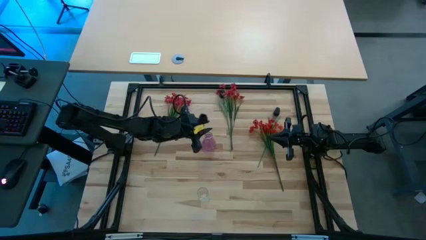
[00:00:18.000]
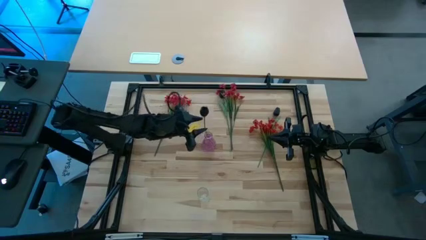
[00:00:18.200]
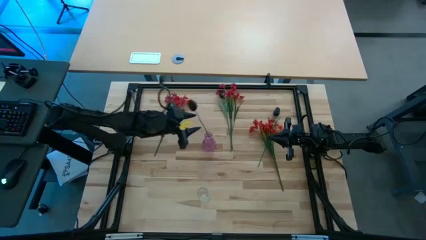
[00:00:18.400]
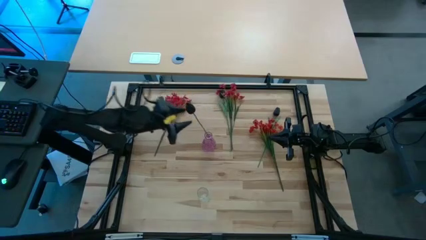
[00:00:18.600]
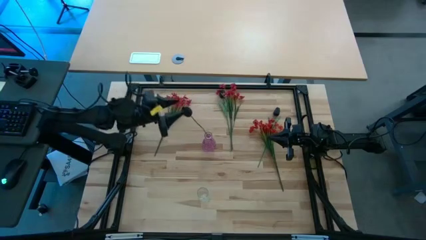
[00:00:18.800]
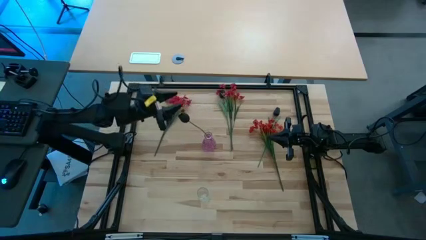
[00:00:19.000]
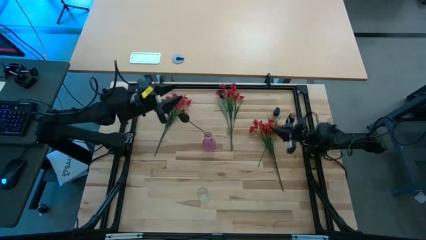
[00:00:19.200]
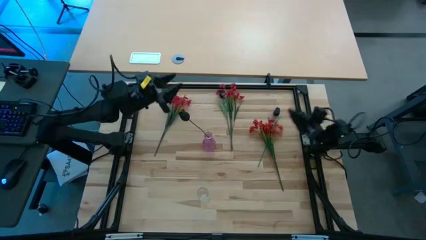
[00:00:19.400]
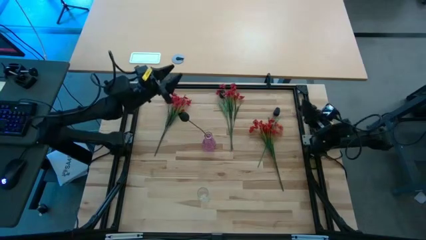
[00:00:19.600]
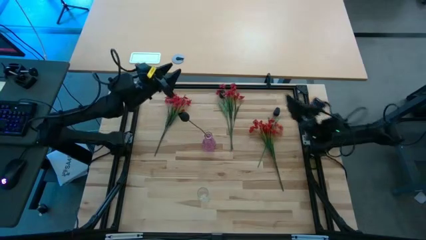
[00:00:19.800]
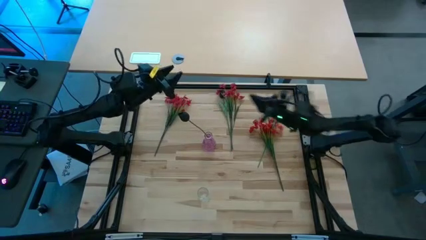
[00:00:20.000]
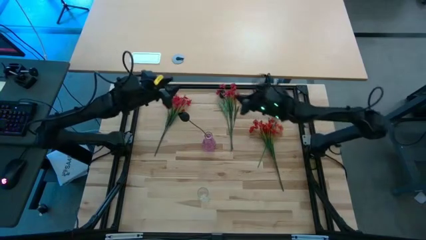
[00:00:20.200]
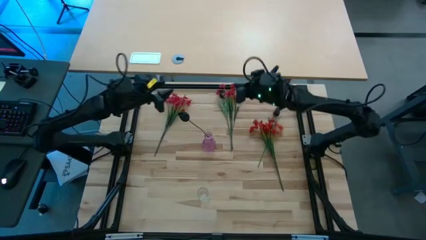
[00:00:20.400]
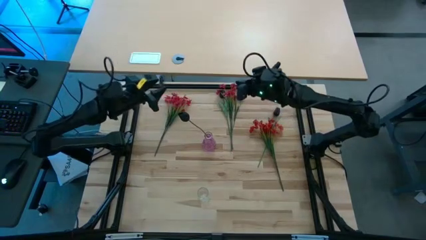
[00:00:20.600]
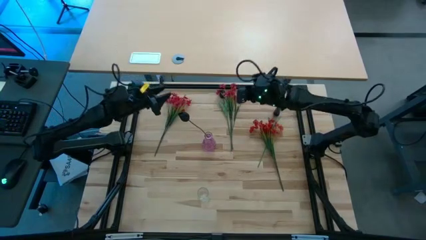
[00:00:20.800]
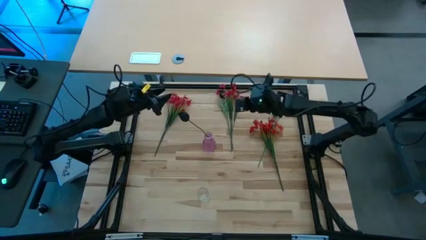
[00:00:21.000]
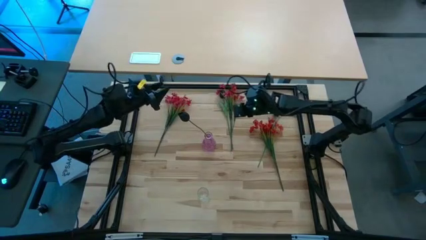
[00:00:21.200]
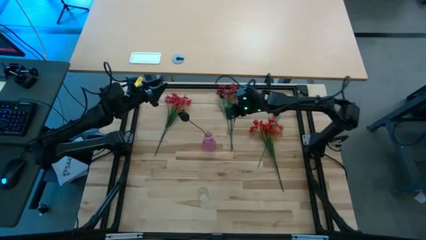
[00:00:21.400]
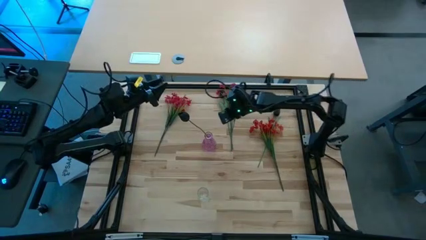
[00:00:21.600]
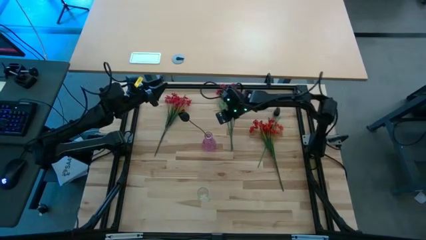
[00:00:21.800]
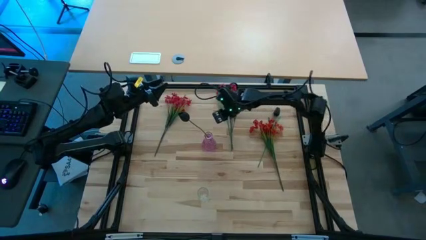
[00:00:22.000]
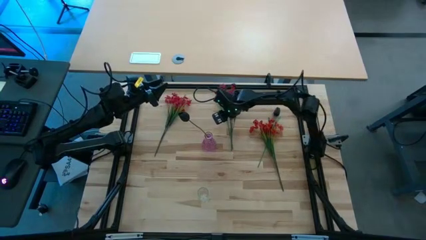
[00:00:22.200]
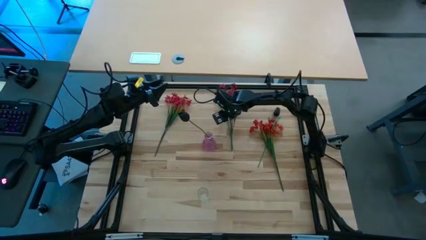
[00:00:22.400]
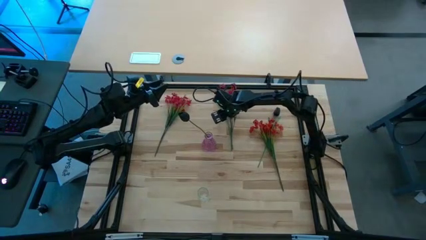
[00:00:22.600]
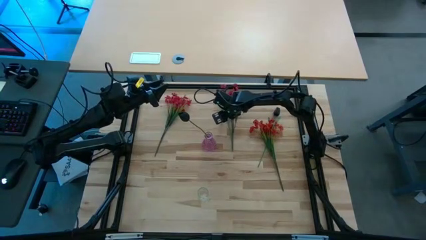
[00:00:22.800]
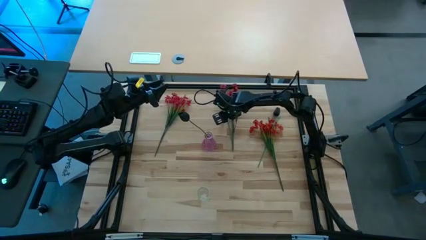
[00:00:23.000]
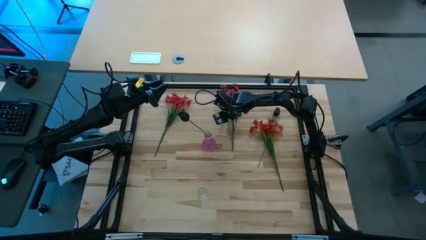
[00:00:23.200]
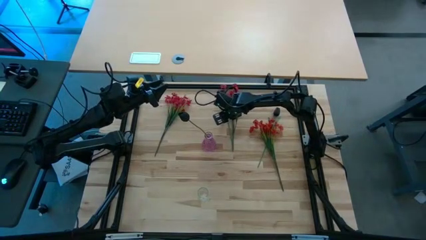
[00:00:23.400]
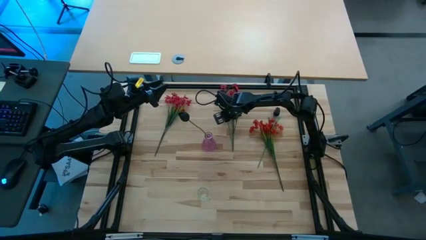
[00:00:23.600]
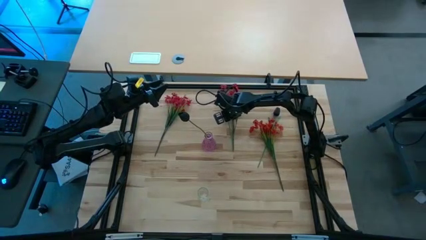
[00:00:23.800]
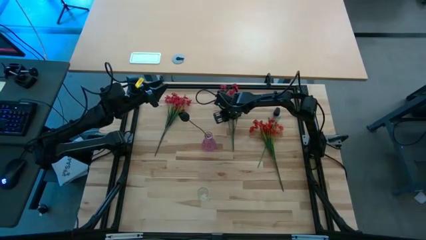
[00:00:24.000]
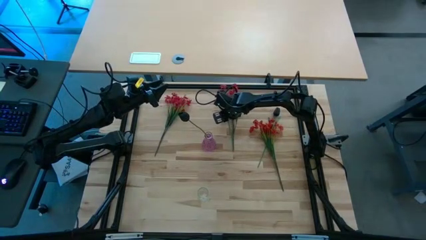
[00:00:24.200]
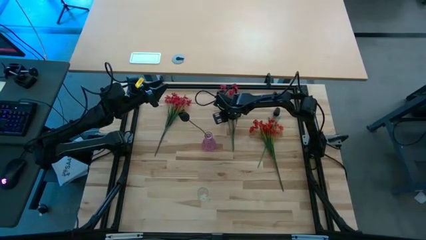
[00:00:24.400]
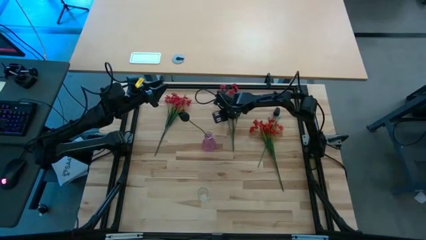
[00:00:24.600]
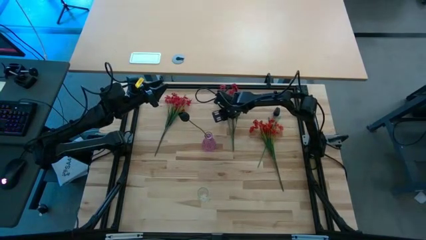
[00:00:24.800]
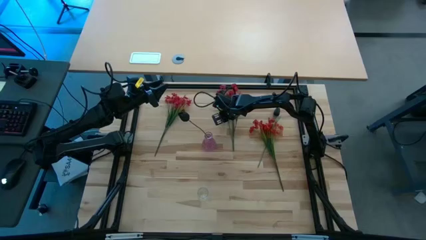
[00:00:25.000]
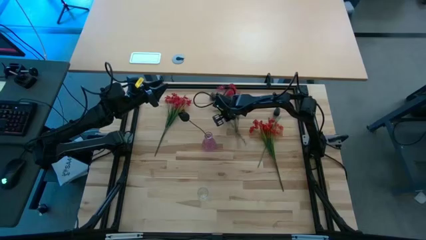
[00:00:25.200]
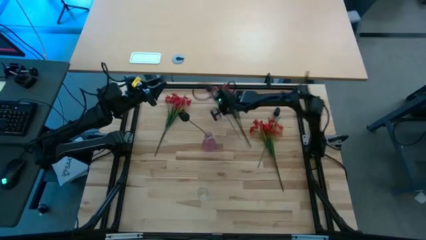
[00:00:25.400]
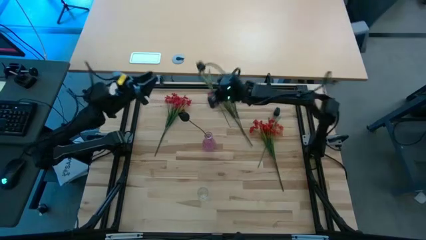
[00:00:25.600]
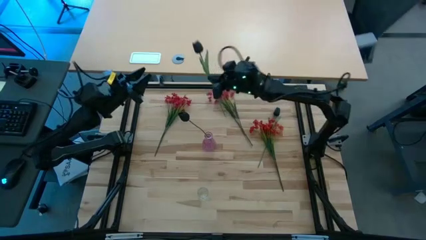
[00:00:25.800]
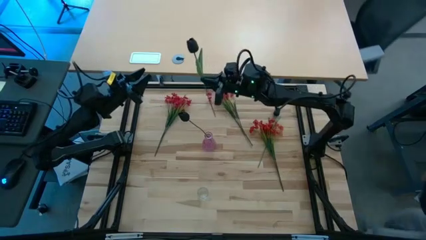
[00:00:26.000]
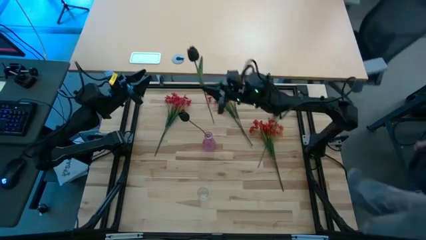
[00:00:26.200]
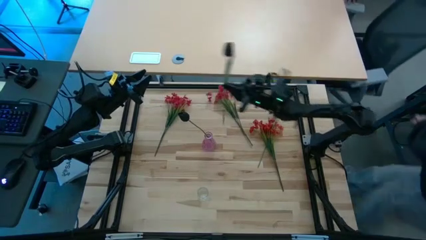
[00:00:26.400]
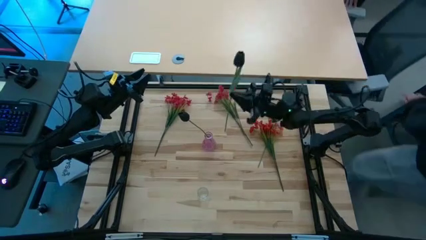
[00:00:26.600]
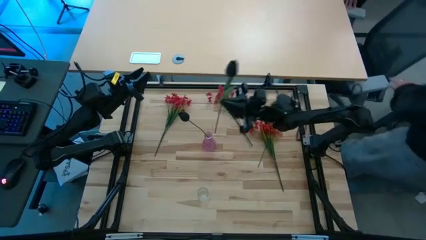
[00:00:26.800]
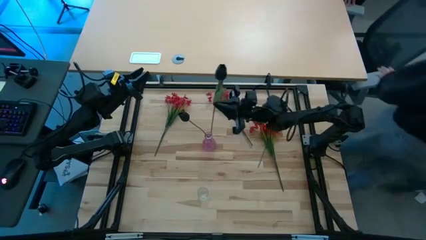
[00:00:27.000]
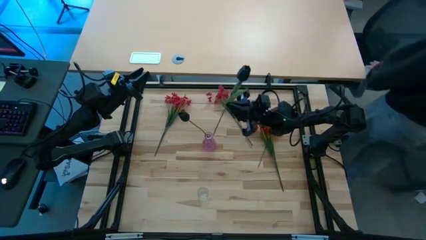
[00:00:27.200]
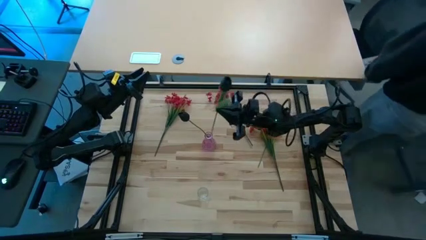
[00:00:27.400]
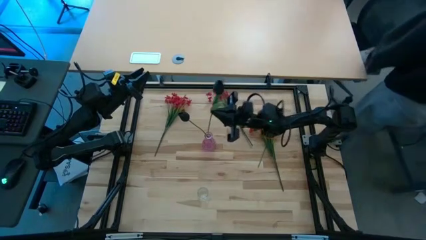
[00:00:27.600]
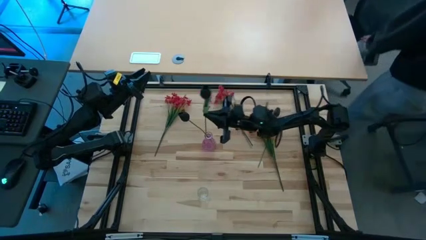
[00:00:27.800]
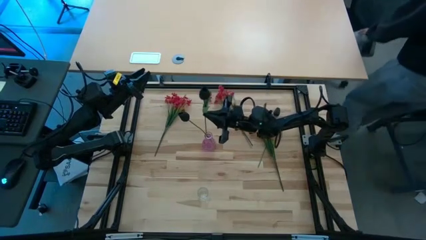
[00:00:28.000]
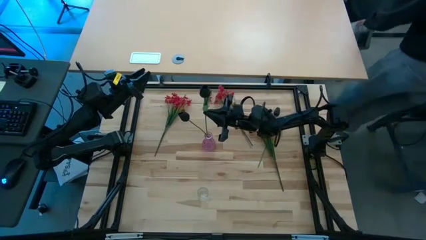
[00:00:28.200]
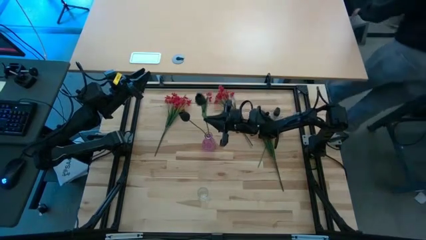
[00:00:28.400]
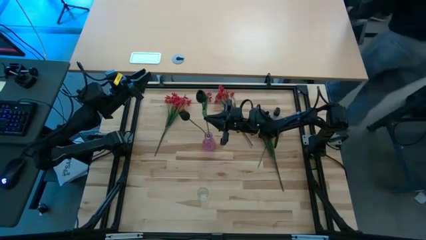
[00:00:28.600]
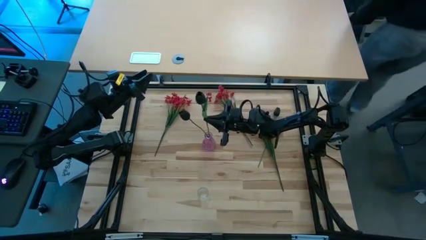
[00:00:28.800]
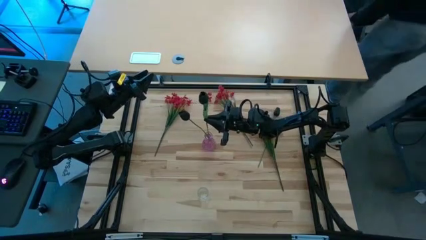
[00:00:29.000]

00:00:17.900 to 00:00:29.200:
Task: Sort flowers into vase by color
Put the top black tulip into the pink vase

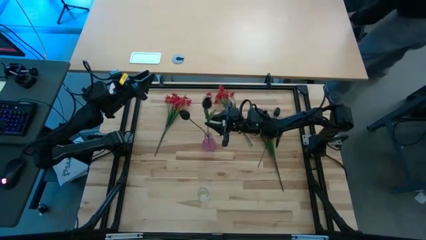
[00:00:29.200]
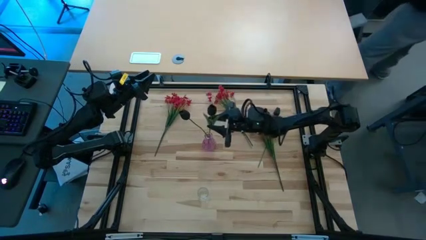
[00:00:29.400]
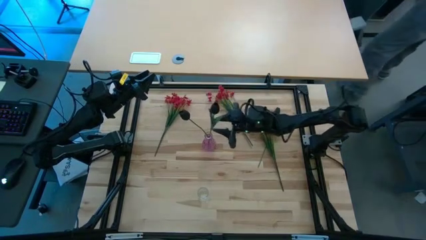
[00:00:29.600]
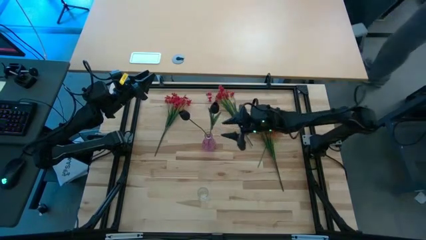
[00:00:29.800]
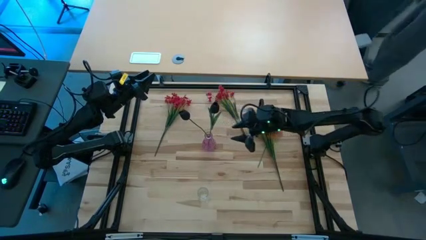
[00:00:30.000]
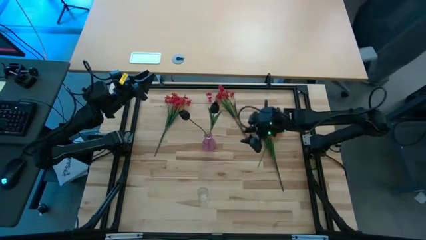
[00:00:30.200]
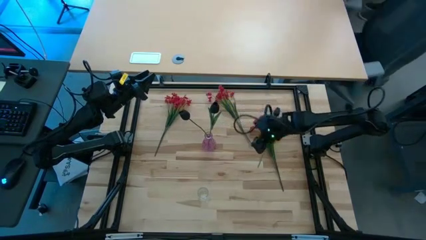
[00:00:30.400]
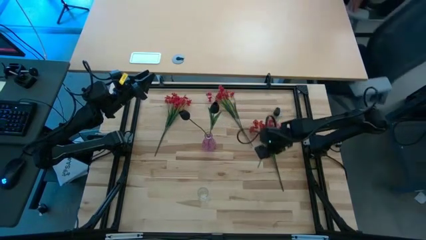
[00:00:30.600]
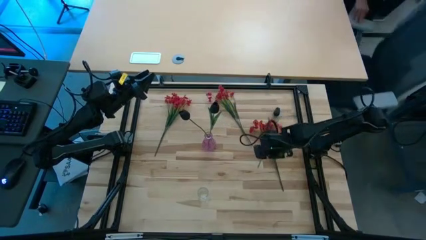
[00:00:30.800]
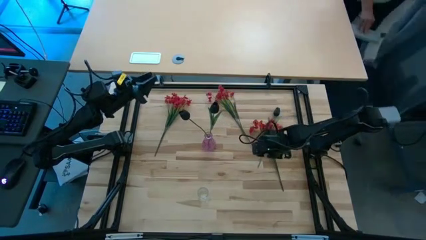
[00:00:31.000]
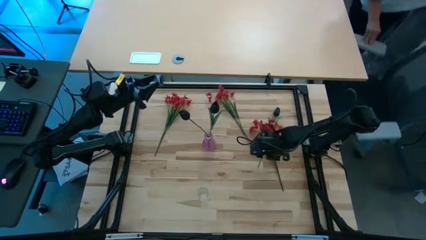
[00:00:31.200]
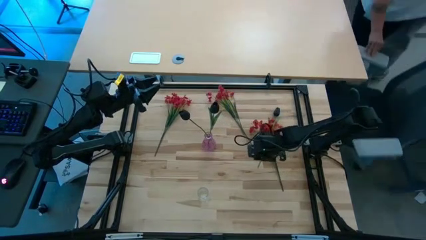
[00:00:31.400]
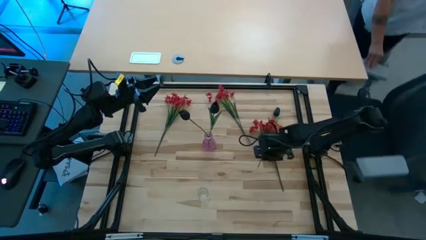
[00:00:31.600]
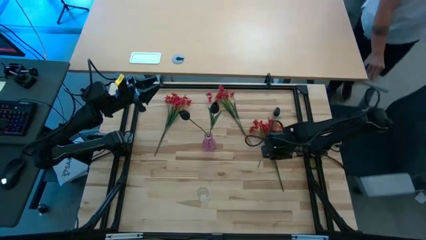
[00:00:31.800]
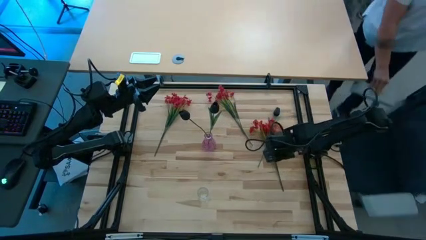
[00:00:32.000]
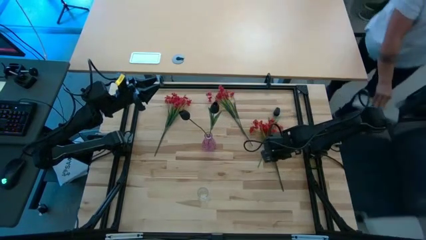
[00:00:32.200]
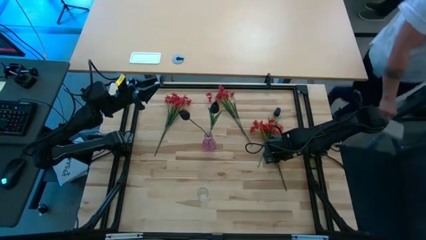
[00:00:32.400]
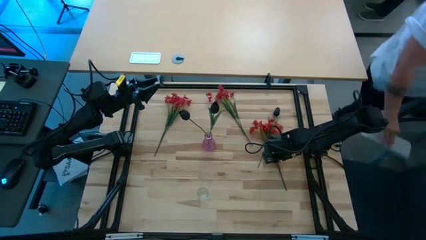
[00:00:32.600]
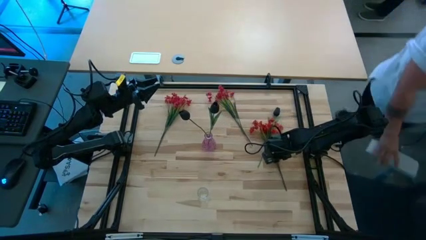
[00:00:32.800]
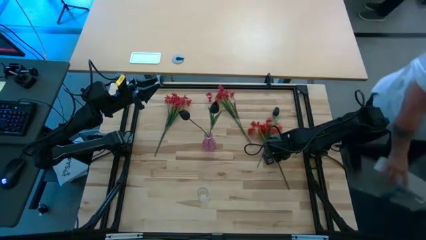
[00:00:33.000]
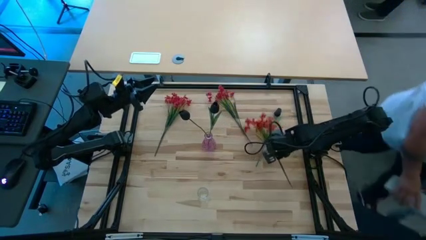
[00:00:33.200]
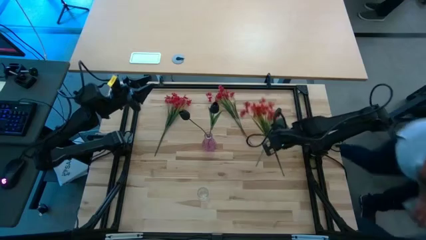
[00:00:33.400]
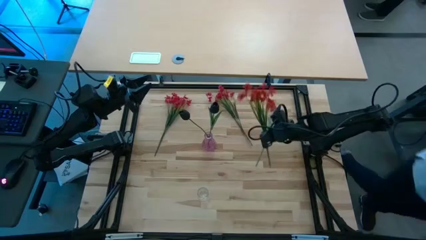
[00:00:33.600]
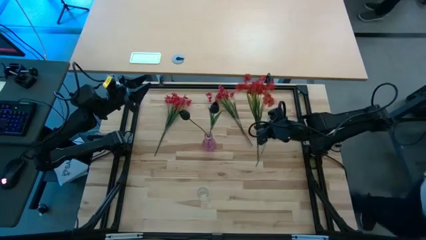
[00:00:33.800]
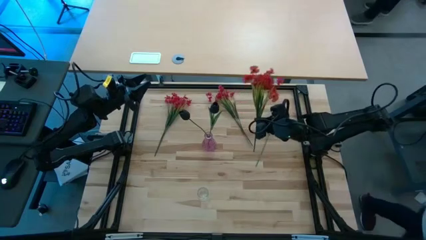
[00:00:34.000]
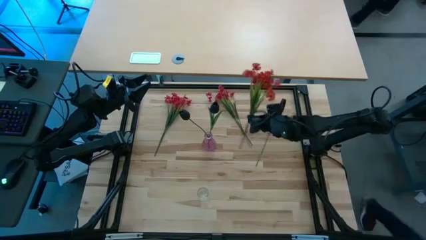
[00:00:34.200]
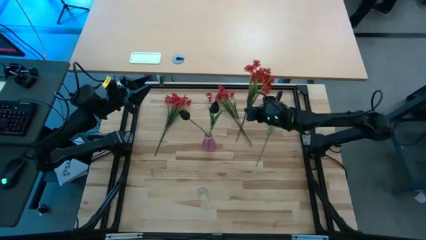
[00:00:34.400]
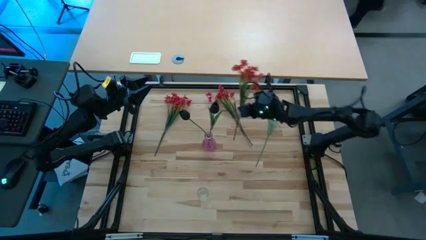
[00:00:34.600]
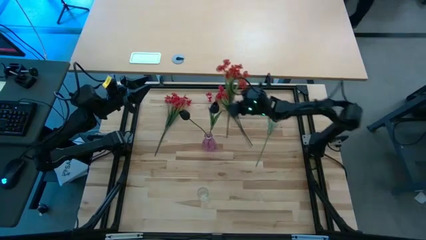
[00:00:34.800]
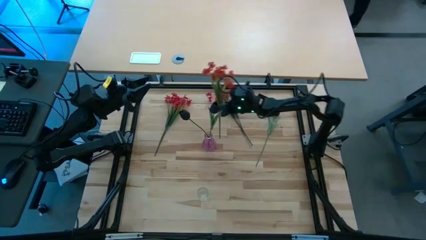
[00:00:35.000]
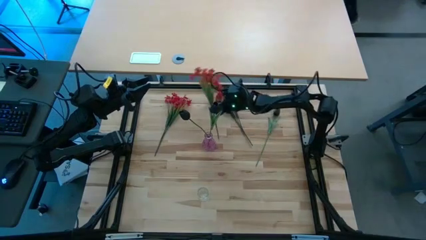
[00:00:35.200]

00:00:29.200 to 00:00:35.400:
Move the bottom red flowers to the top center of the red flowers on the table
